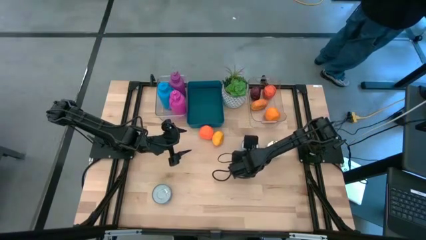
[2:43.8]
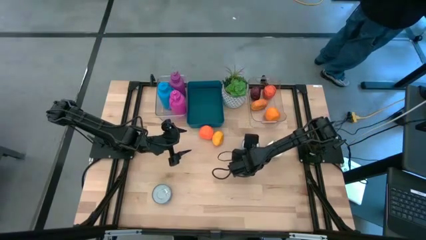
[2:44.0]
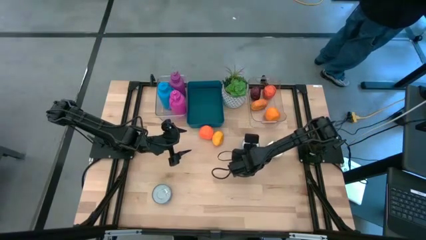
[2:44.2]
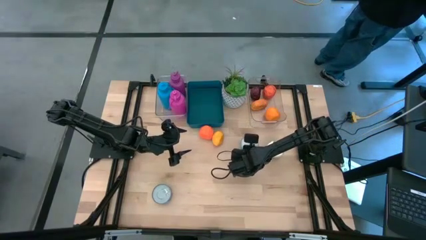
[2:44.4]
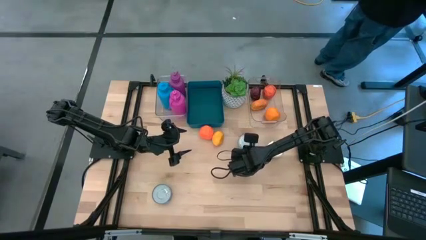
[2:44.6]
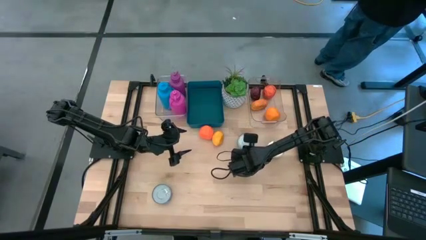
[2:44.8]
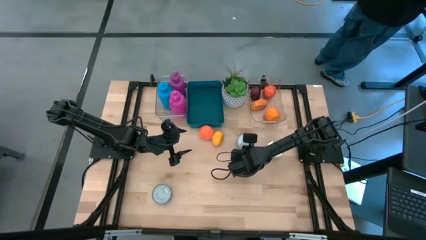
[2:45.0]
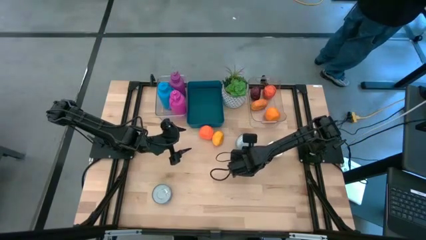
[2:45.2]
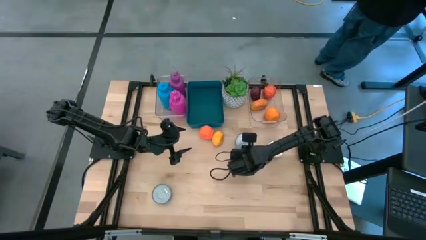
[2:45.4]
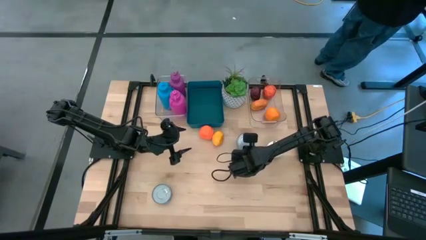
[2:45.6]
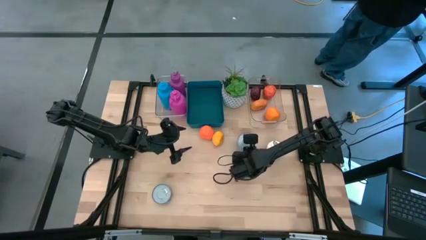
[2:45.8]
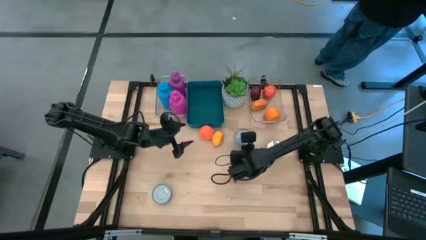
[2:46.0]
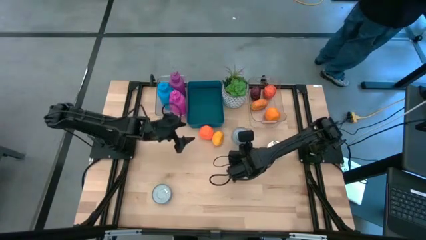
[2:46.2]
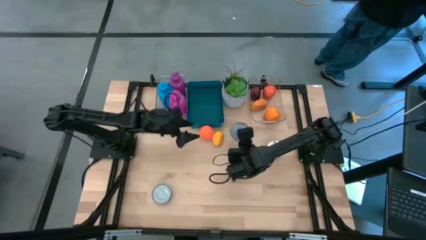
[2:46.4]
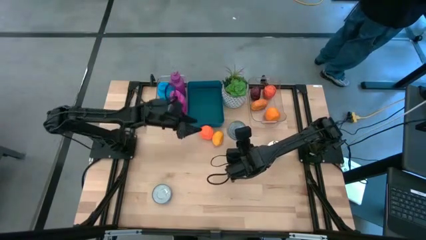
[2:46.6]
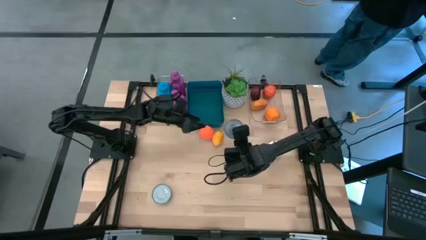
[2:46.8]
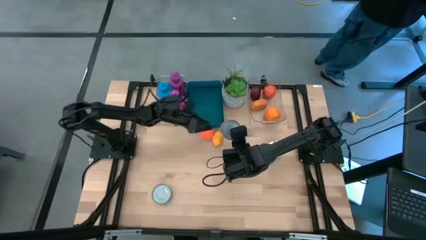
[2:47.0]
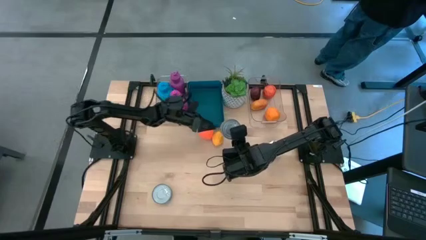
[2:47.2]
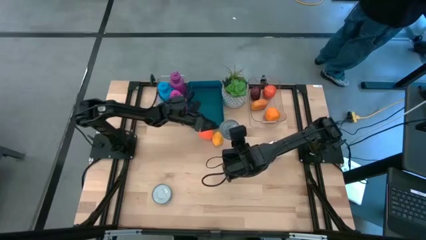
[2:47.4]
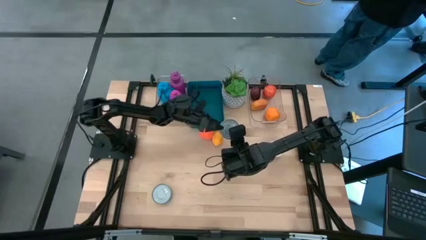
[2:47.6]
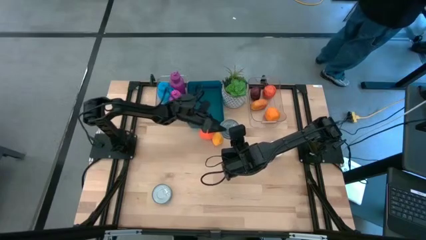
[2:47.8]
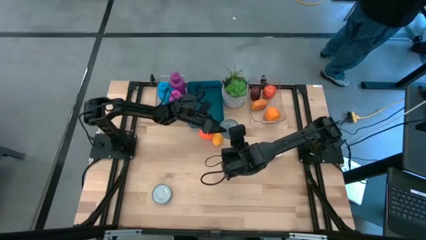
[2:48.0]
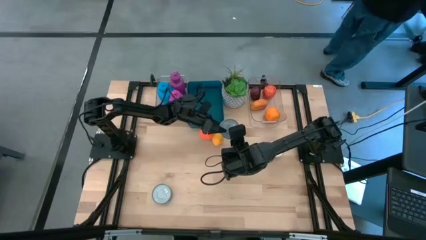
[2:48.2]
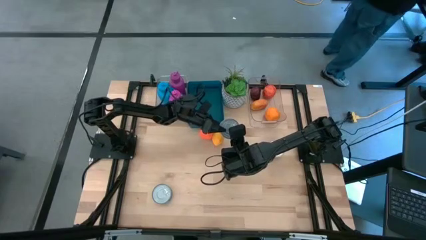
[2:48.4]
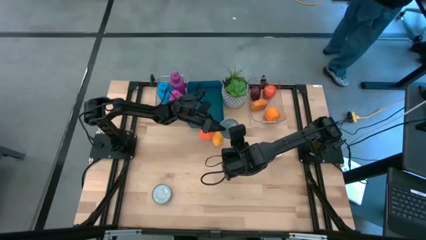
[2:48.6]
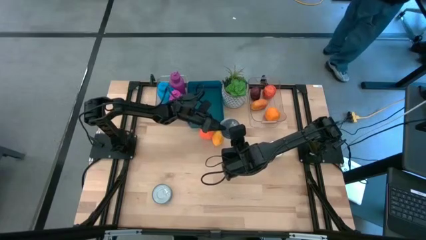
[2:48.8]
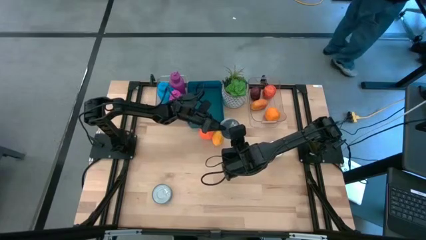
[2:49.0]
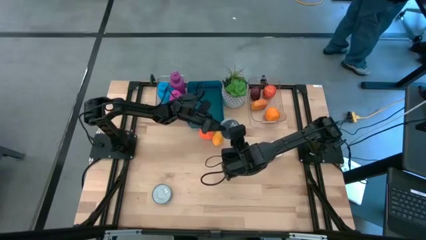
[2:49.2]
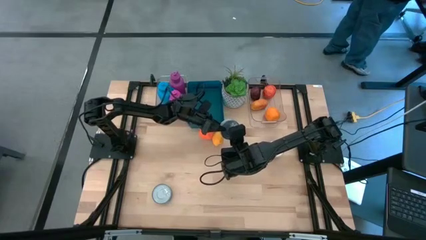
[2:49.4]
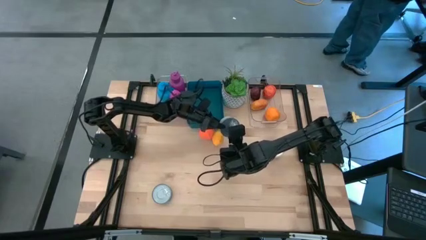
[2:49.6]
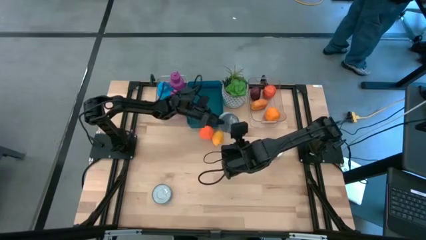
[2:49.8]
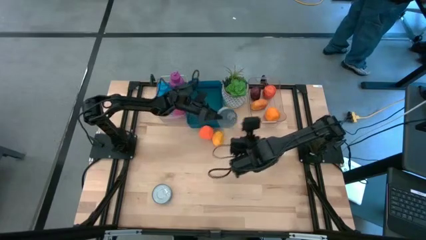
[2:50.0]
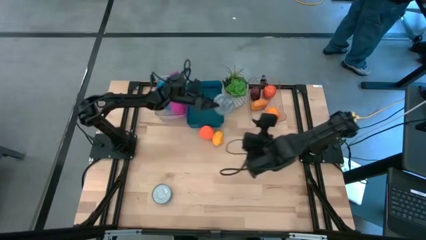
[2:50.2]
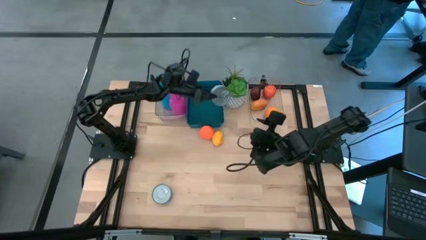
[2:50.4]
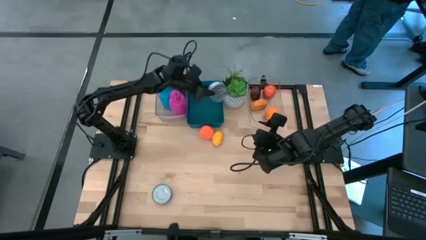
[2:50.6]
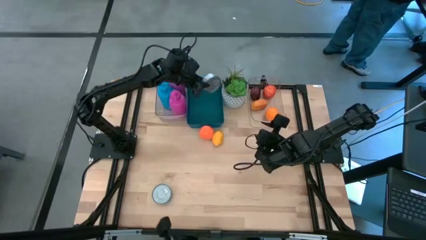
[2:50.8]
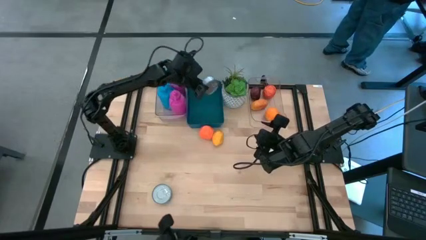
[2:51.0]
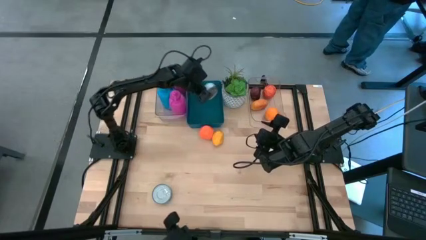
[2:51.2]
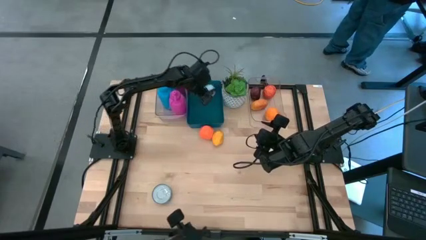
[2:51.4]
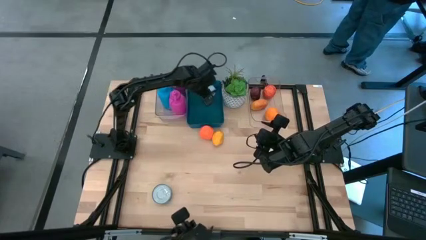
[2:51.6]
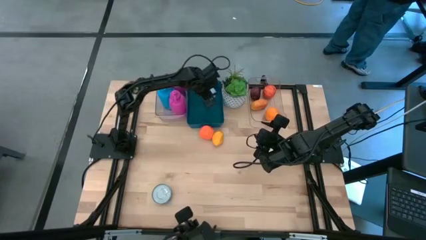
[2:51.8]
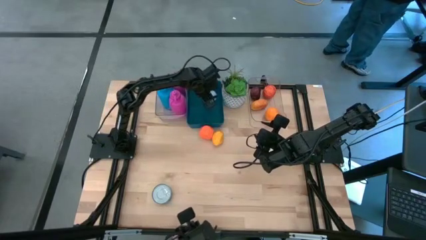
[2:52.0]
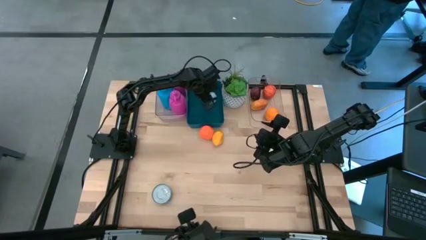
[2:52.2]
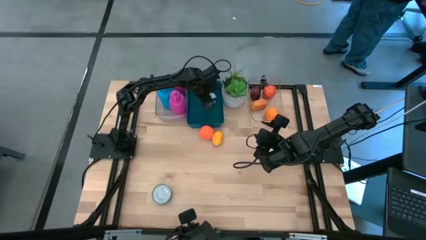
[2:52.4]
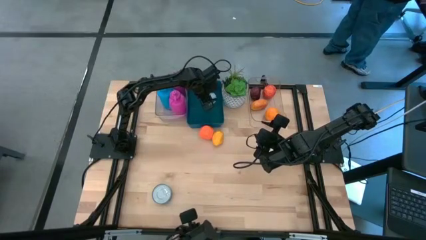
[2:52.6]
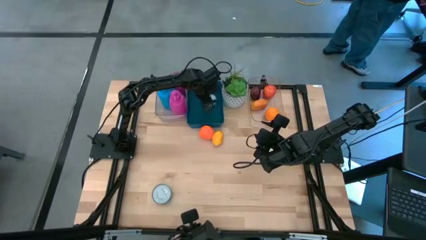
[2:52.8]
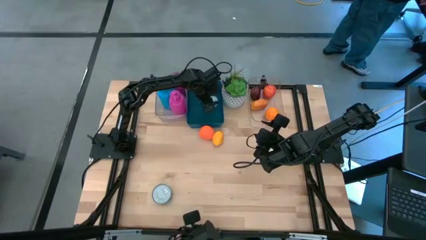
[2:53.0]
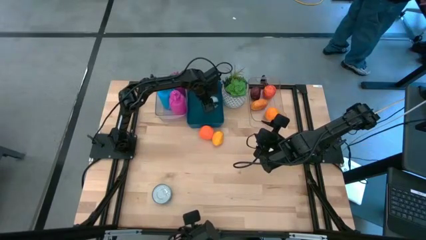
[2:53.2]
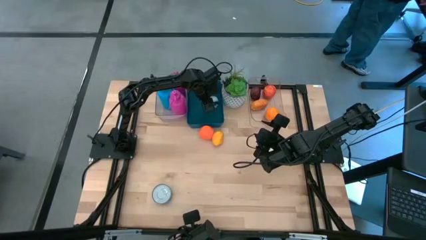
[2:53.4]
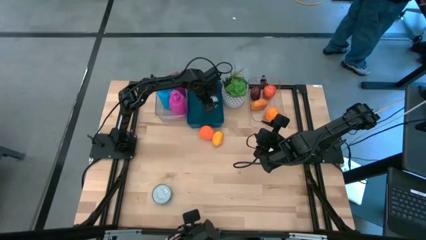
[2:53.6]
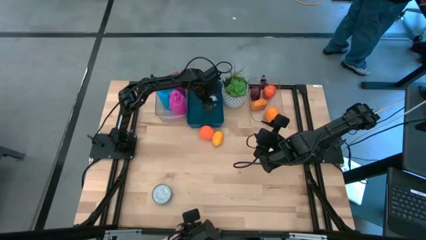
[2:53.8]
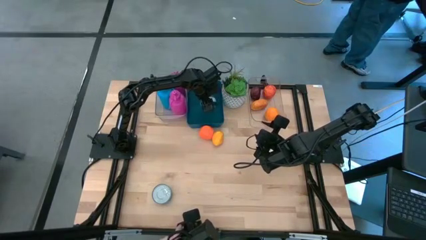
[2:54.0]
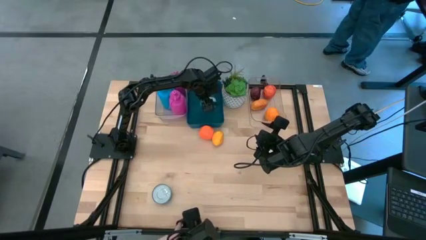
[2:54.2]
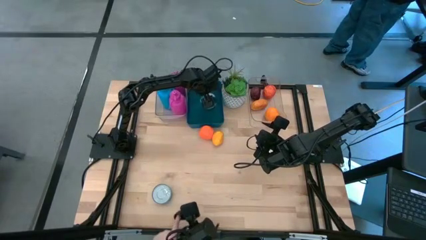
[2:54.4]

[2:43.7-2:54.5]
Task: Pick & Place Food Item
Put the green tuna can into the blue bin

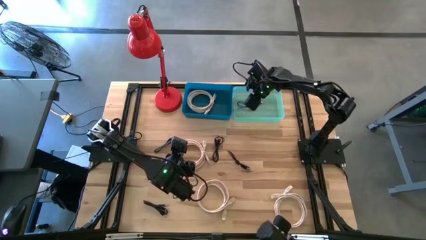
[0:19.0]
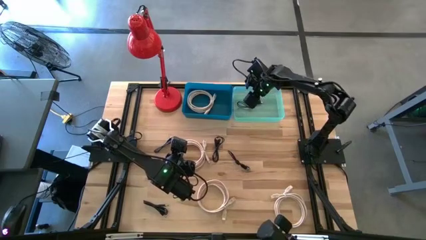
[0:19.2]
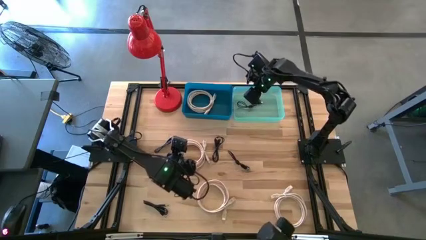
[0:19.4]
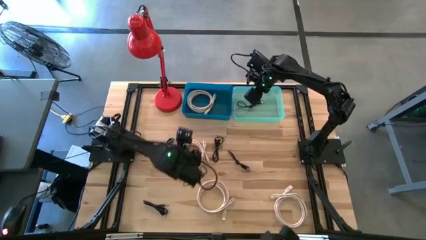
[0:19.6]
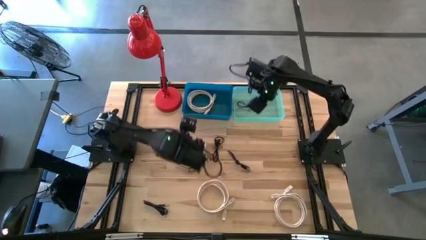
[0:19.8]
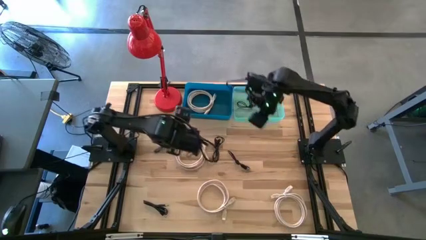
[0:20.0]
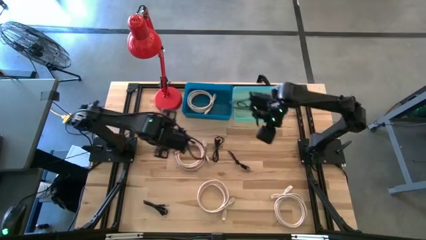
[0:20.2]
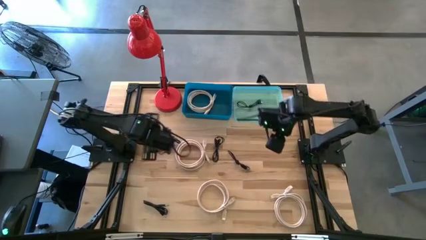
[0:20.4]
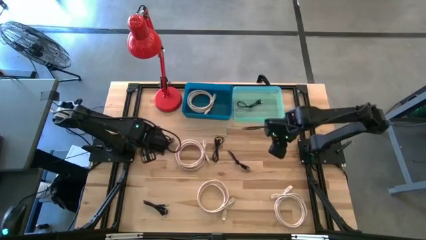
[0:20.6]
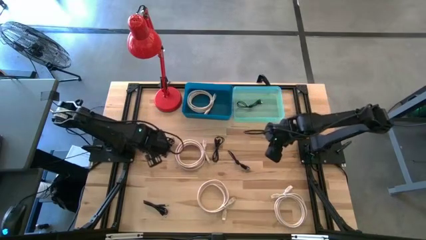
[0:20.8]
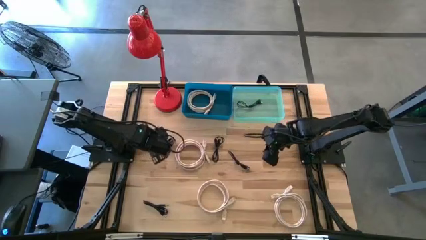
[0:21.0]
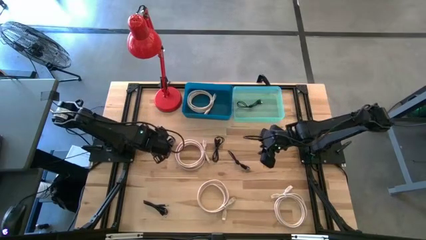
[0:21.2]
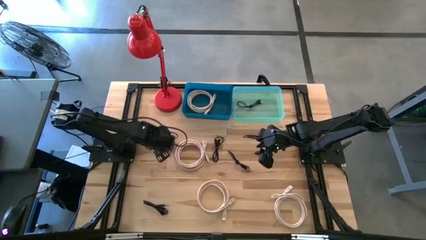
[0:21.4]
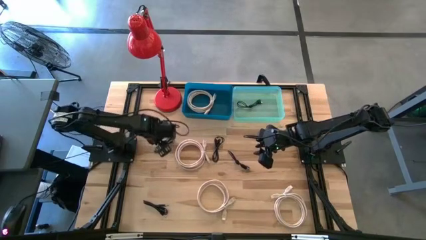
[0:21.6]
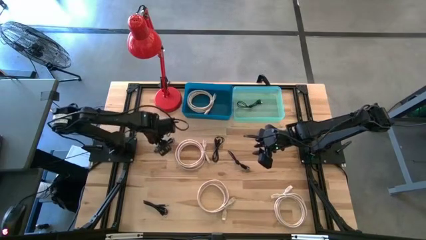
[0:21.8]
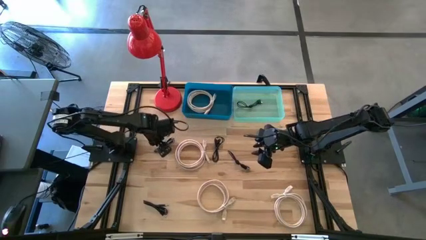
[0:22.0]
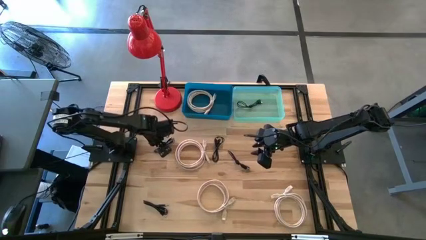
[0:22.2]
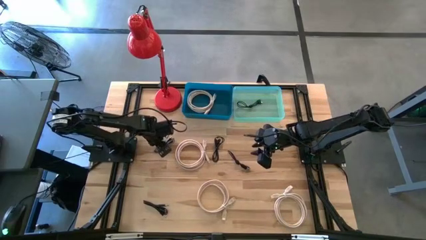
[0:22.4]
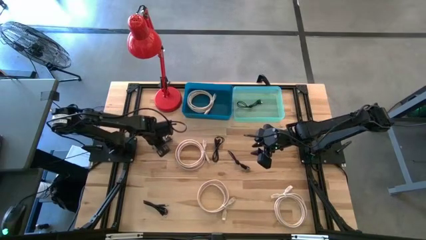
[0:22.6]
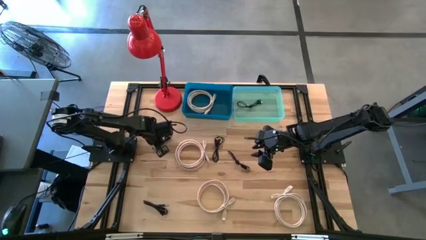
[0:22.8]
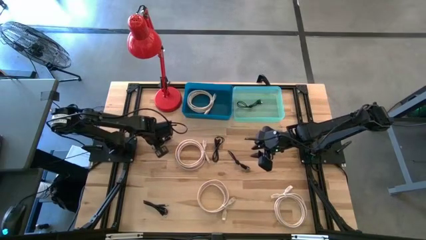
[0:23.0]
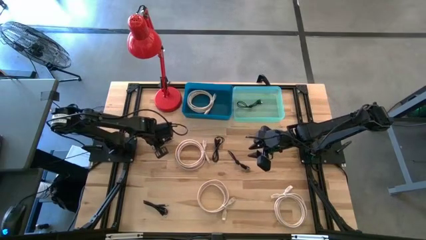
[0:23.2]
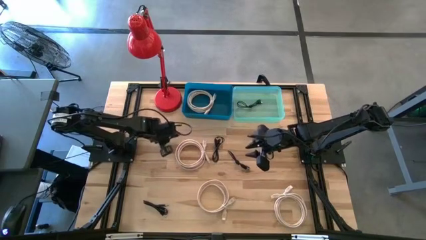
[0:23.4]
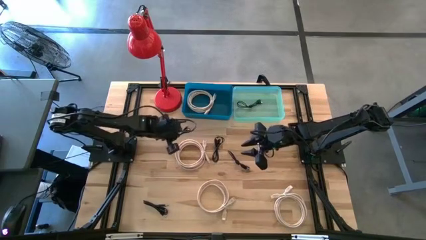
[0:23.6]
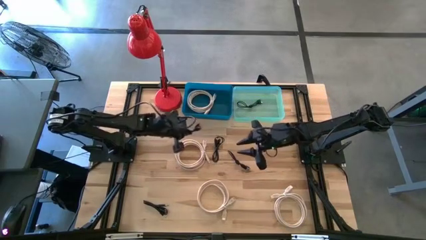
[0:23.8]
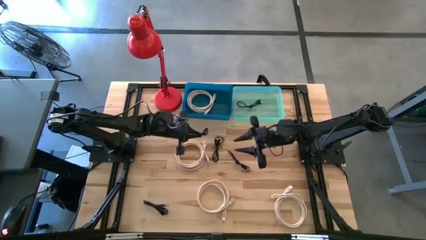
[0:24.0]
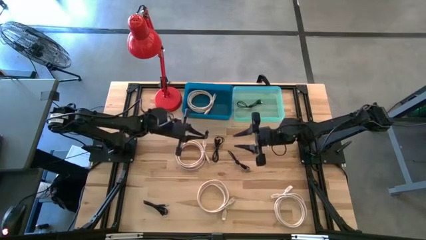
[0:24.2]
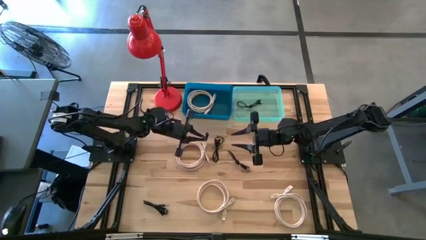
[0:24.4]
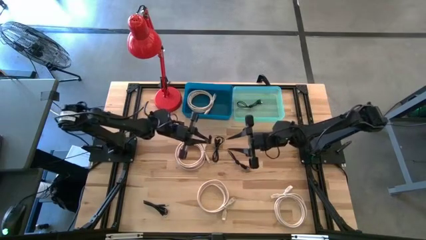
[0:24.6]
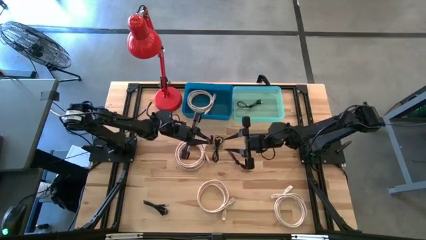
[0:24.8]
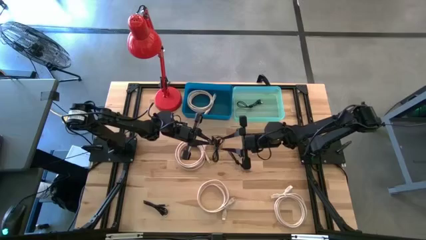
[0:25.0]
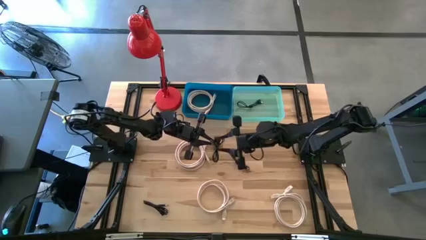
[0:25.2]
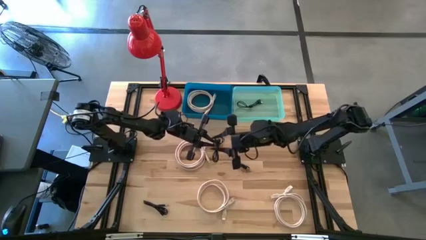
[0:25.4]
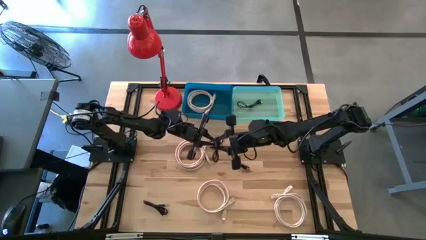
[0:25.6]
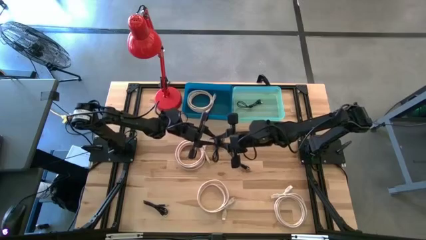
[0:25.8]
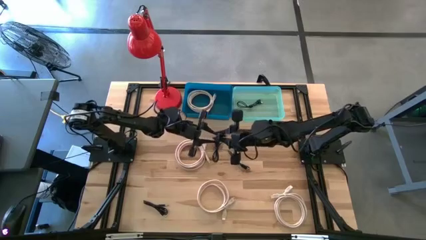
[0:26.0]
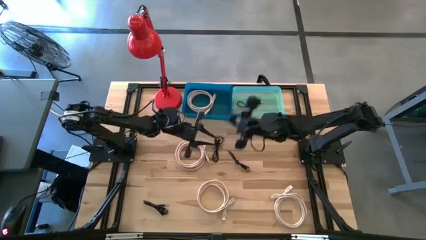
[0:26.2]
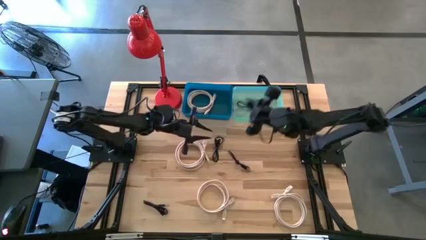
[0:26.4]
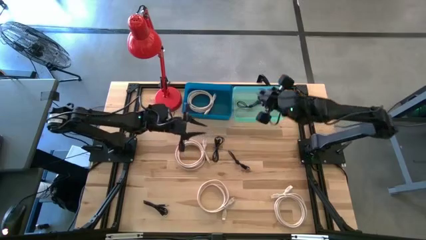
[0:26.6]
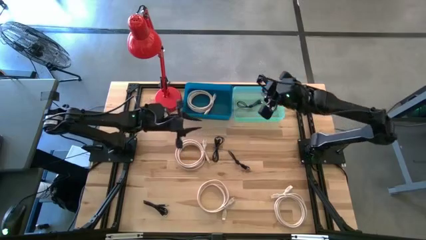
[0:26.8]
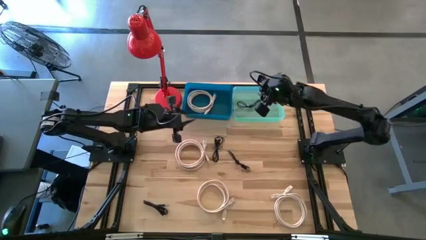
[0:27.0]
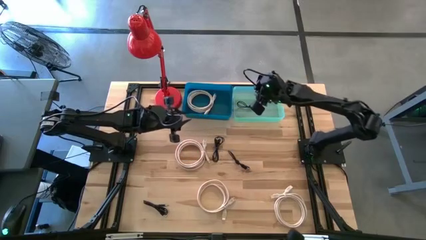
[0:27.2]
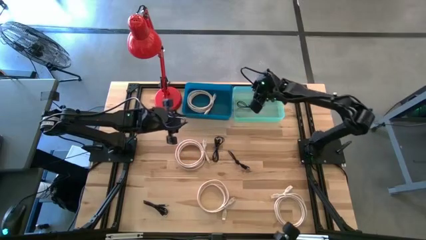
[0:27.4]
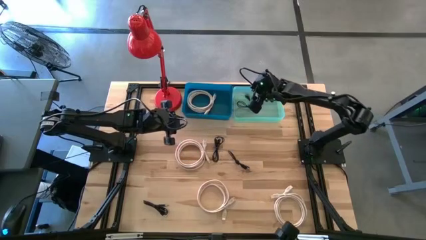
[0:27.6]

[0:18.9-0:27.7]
Task: Pick & Place USB Port
Put the black charger cable into the green bin
